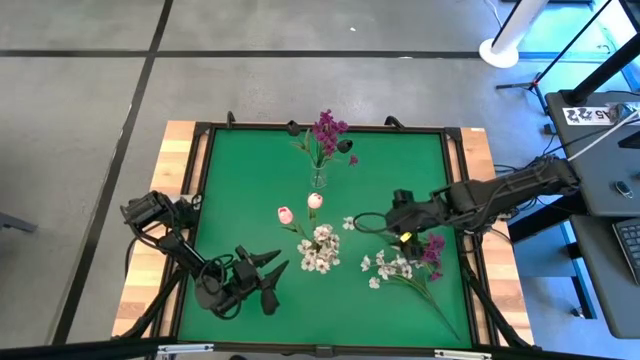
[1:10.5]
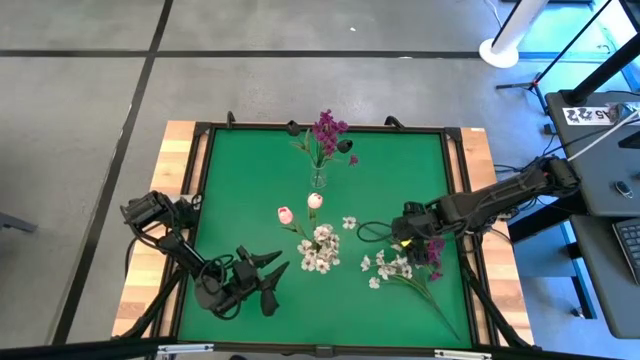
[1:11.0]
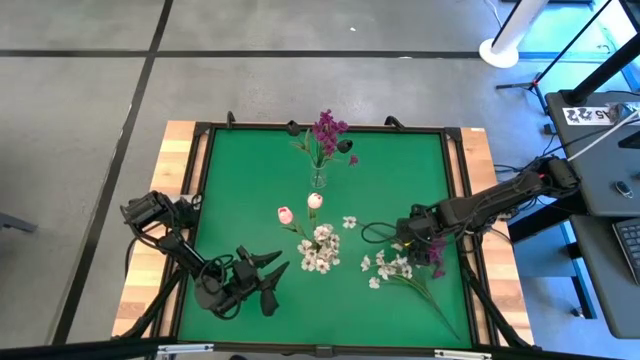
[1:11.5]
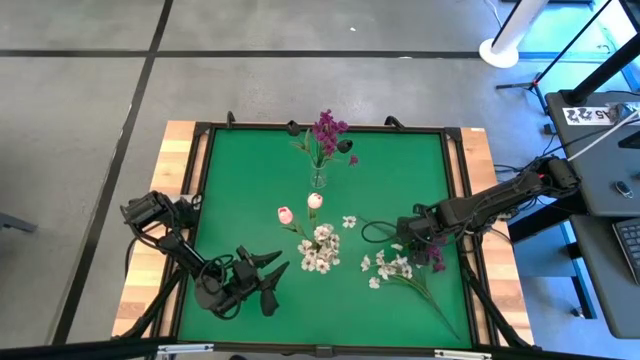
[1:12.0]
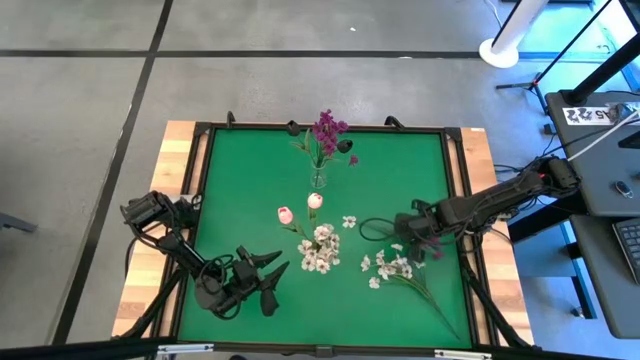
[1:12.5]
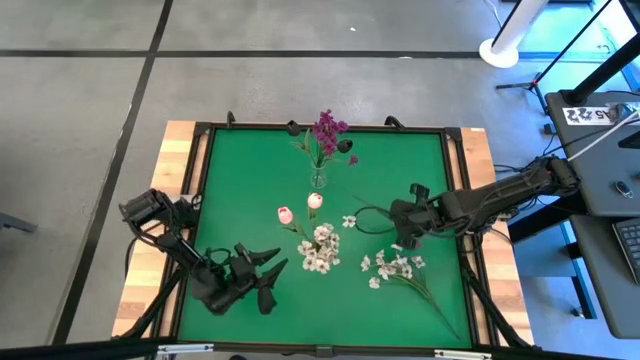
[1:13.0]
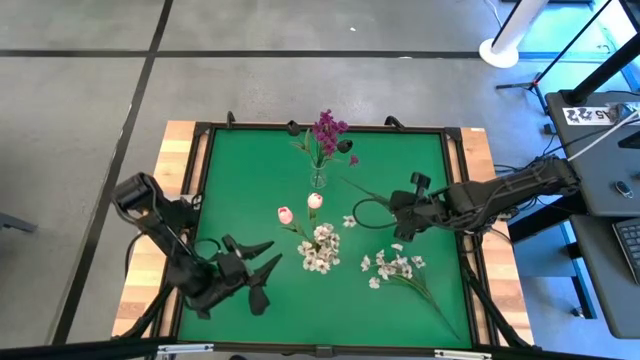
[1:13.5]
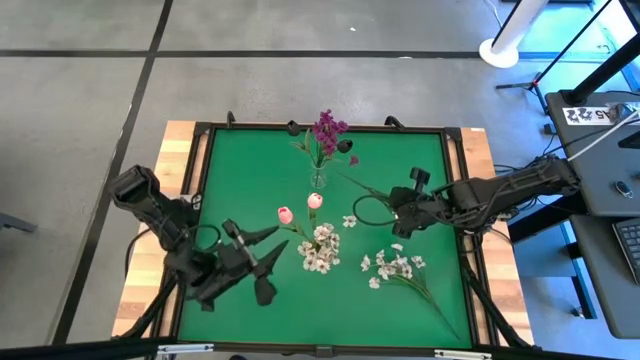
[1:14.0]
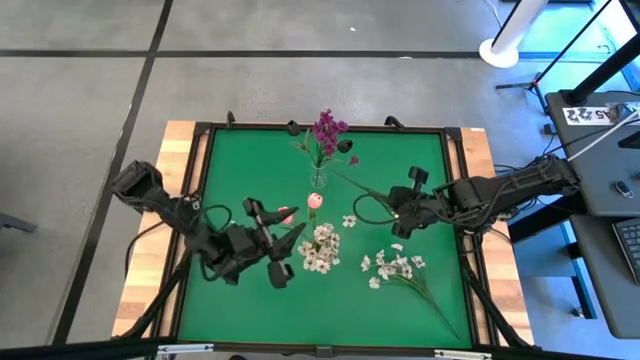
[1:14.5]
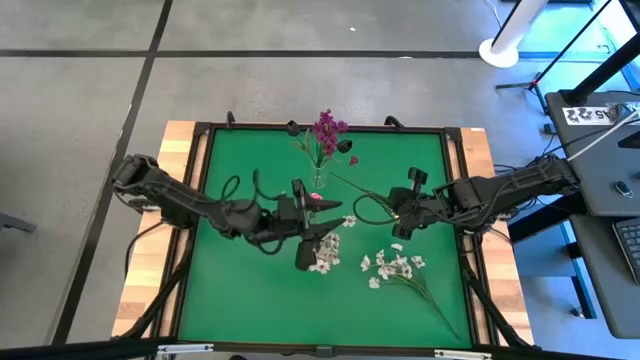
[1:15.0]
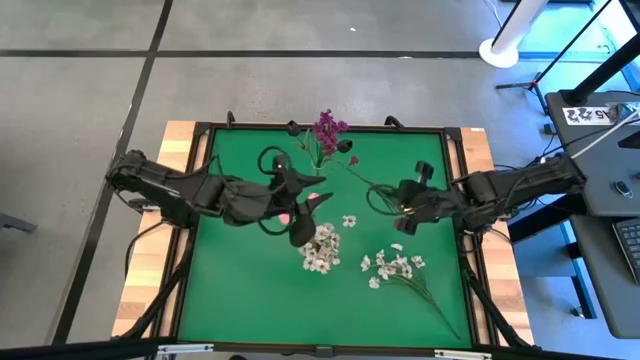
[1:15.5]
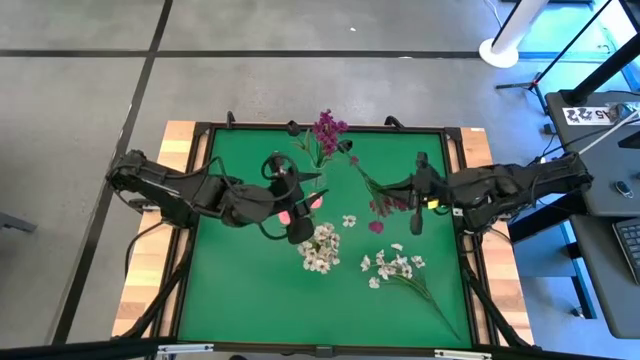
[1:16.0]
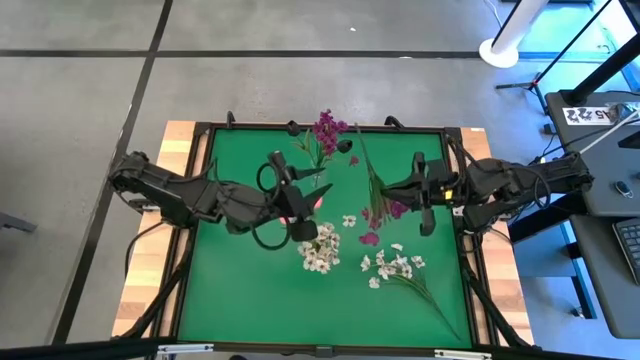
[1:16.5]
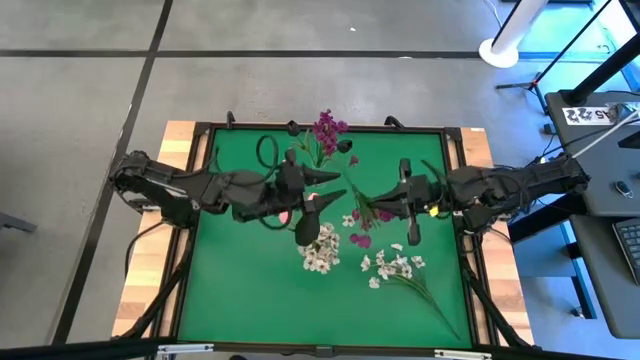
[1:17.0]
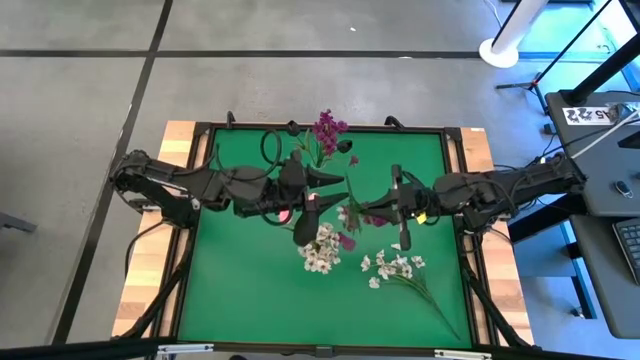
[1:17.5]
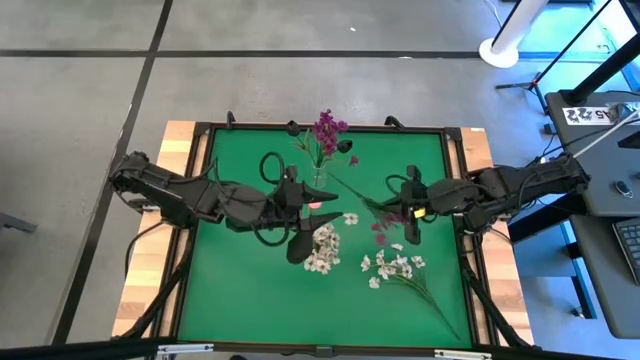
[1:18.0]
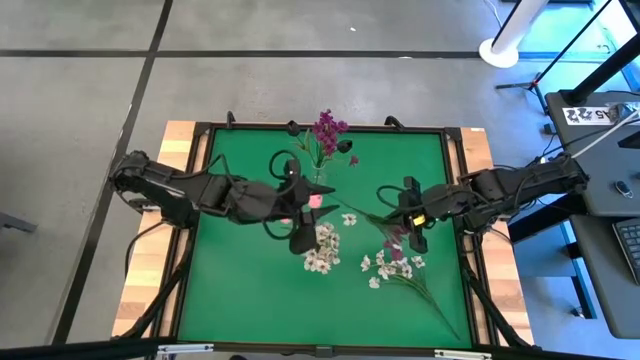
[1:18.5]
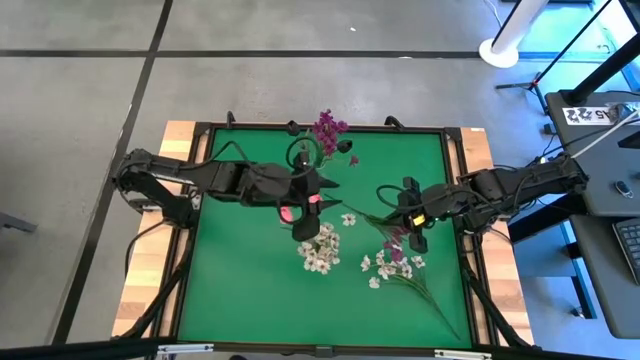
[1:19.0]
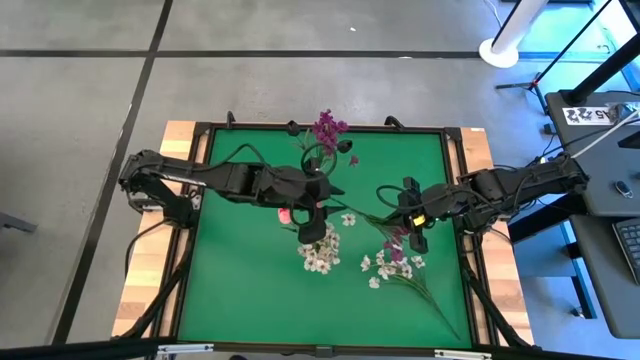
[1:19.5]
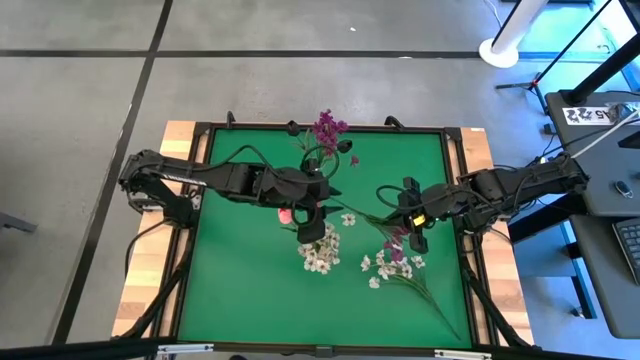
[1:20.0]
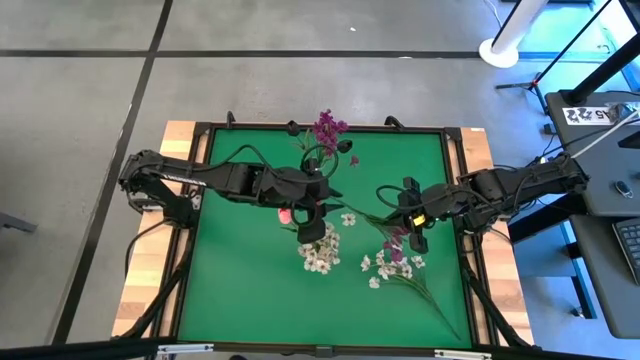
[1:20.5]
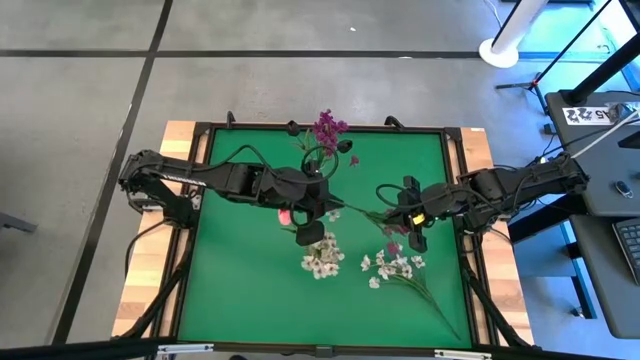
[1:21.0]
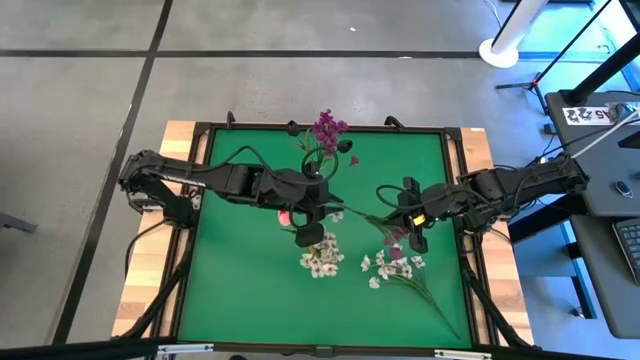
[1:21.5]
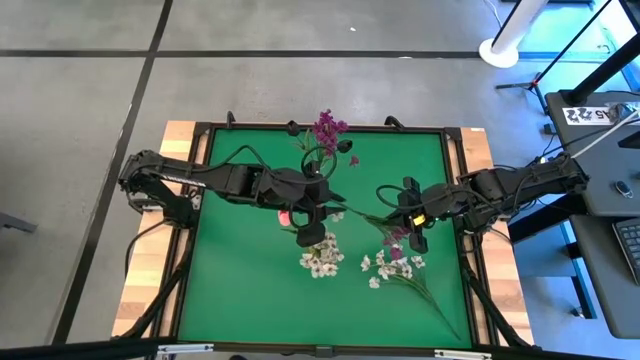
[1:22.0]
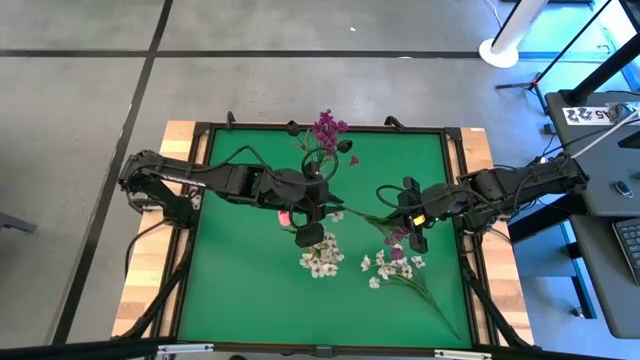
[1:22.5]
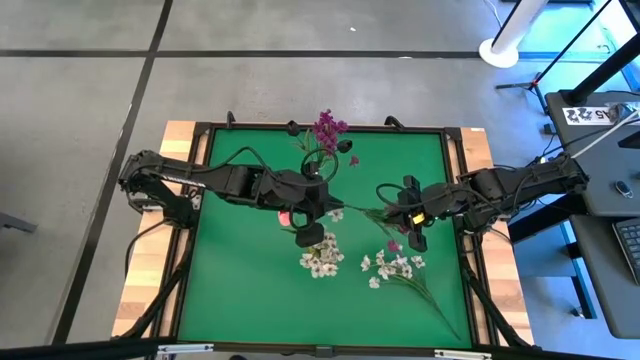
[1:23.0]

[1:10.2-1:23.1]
Task: Sort flowers into vase by color
Put the purple flower into the transparent vase

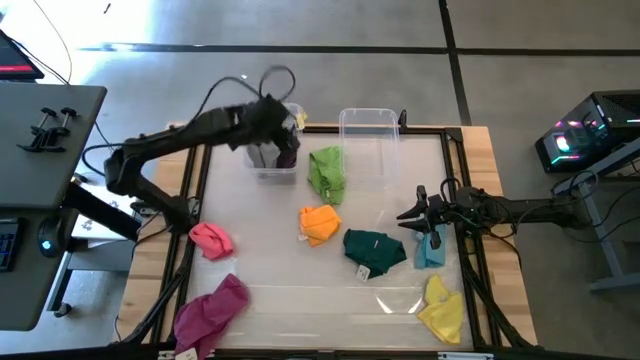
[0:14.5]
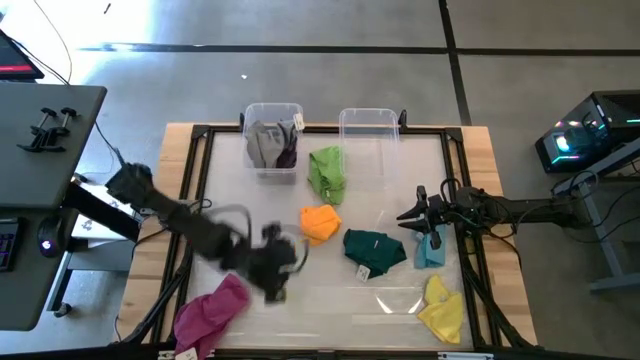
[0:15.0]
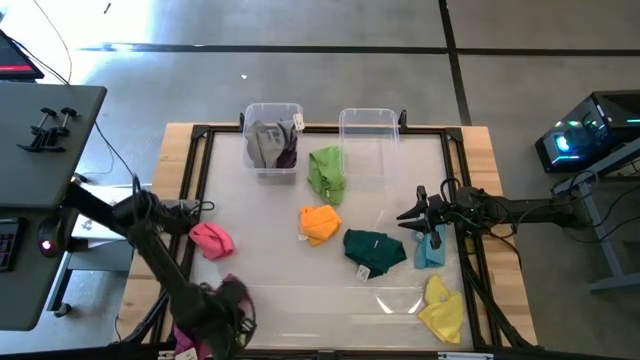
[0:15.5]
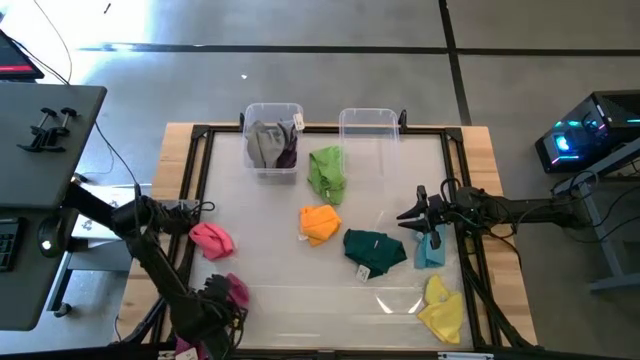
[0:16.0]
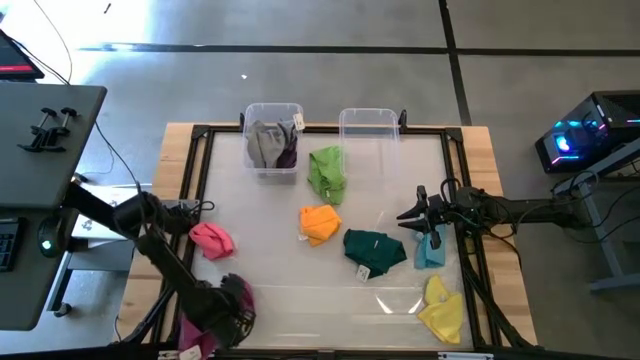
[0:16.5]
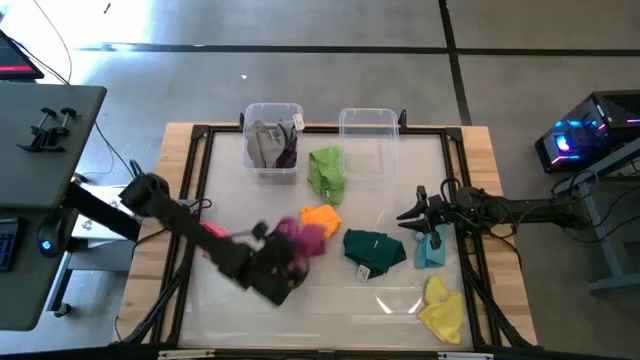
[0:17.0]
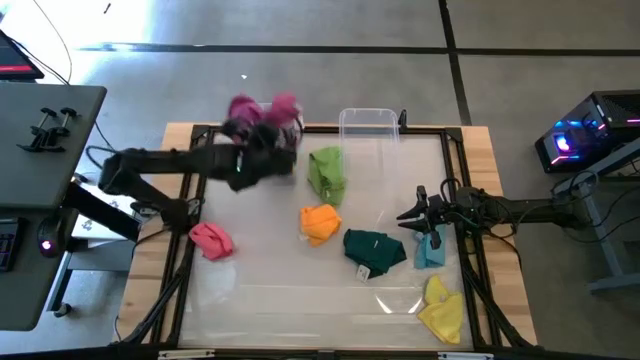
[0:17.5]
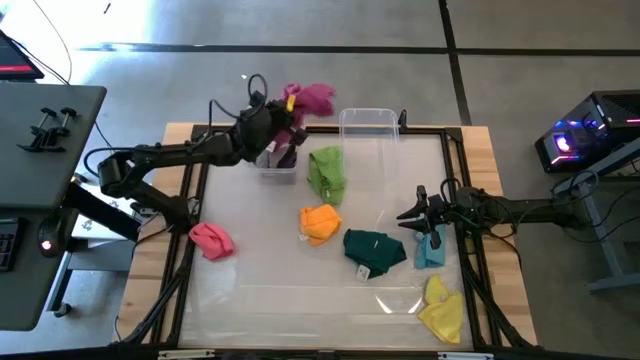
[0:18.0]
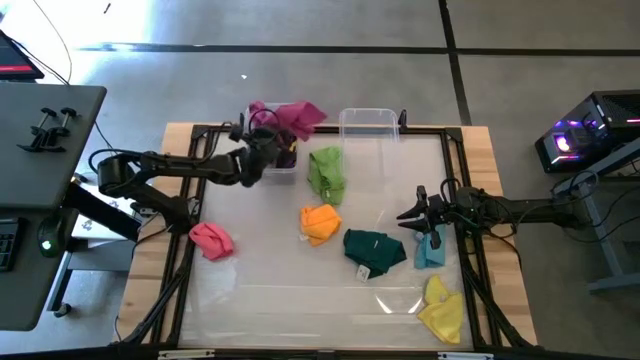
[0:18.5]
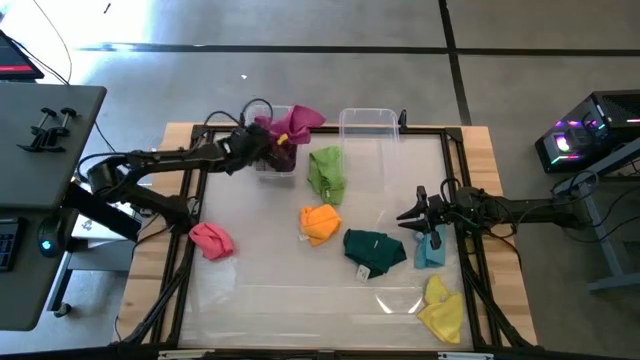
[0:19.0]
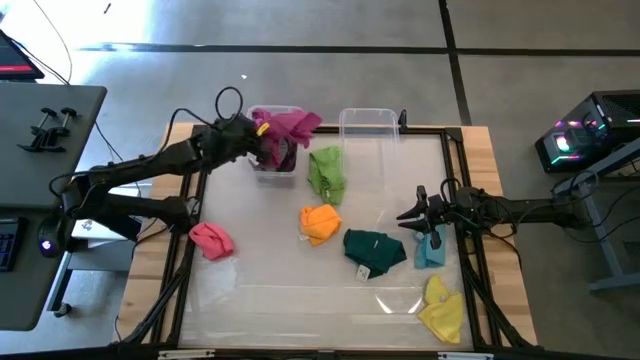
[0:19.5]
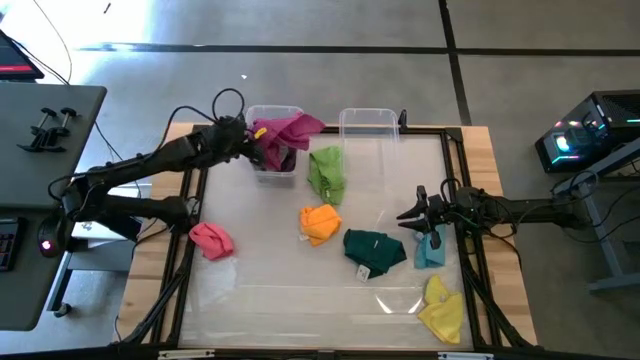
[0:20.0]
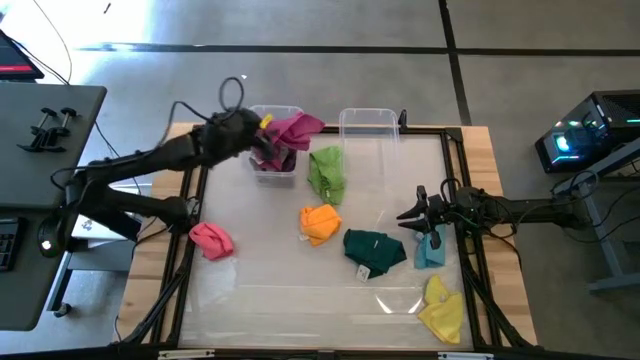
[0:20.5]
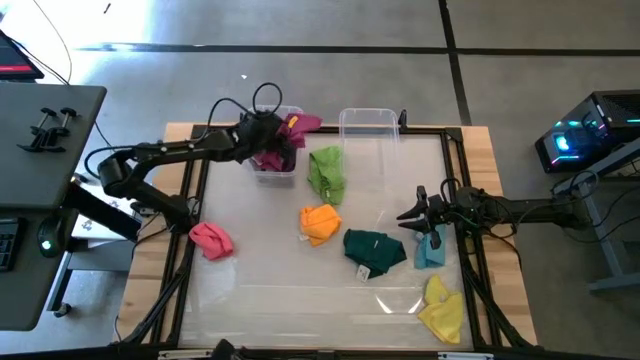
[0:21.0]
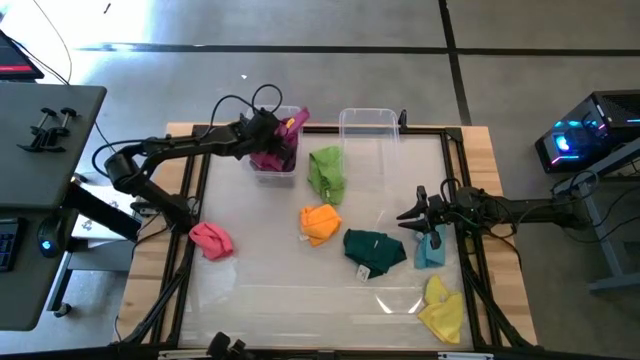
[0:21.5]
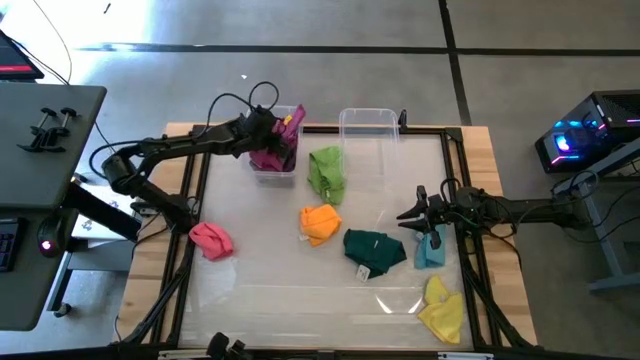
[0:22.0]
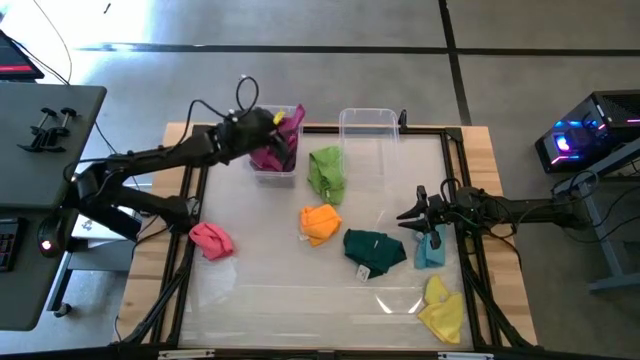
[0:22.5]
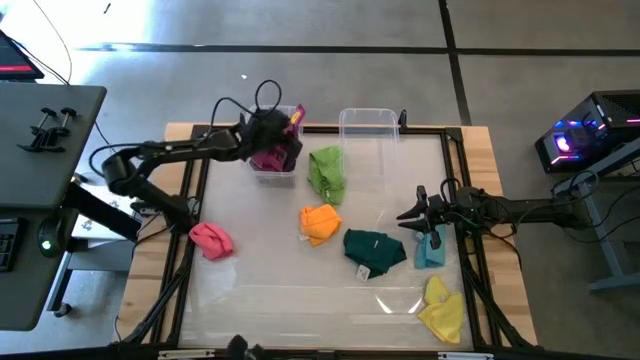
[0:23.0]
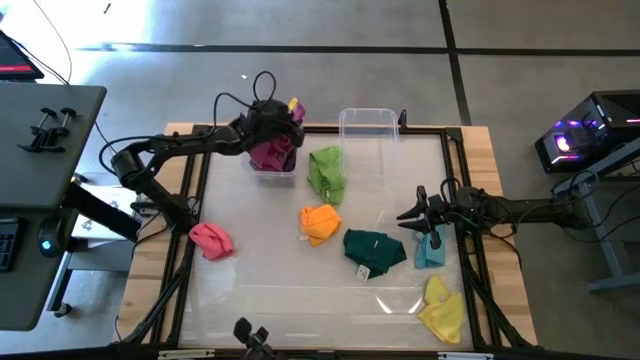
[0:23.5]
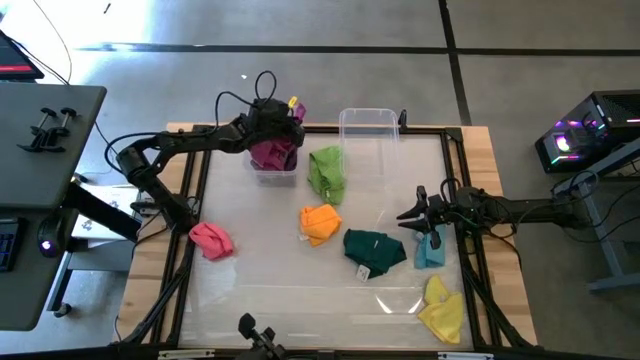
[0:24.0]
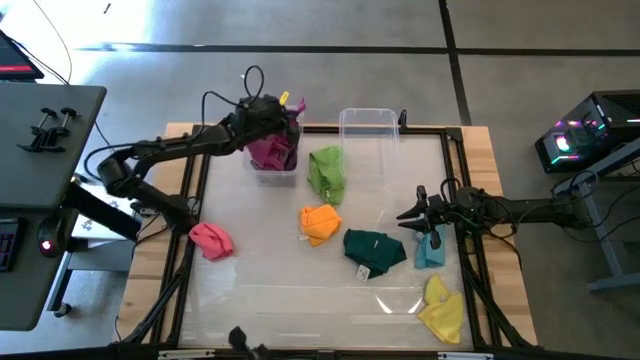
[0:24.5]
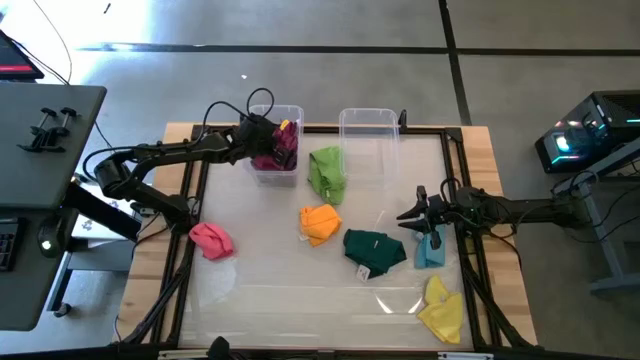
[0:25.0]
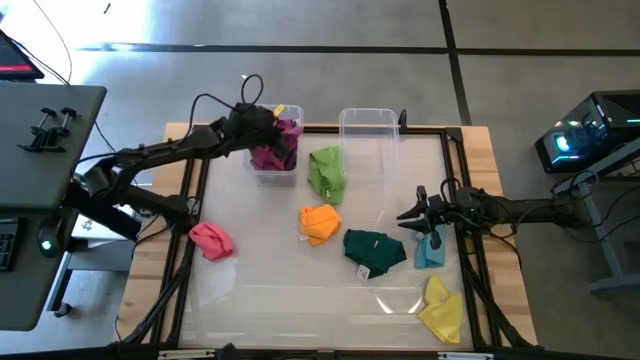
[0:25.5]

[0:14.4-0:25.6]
Task: Sort towels by color in basket
Put the dark pink microfiber cloth into the left transparent bin
